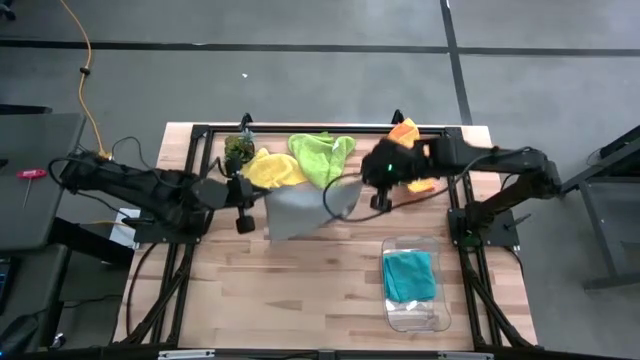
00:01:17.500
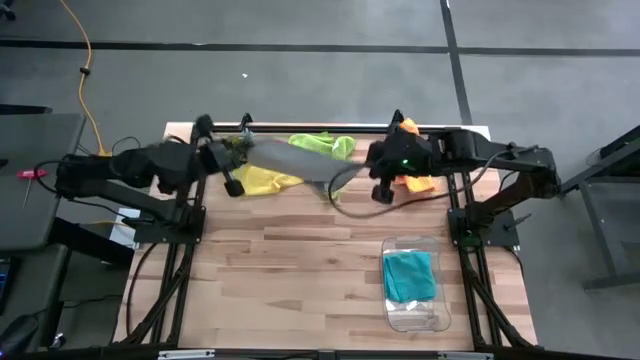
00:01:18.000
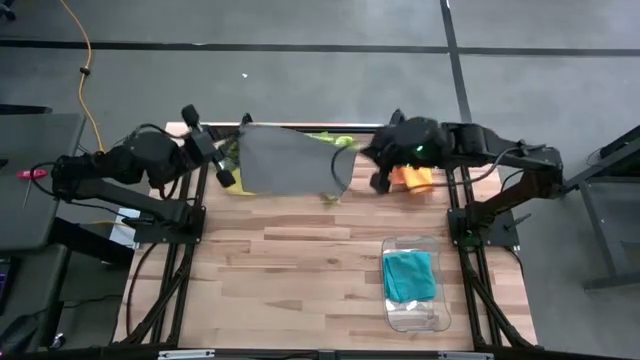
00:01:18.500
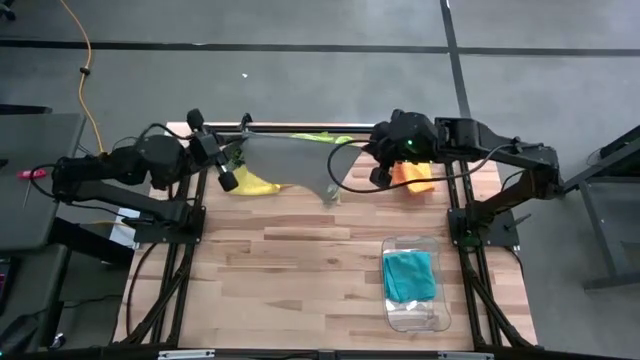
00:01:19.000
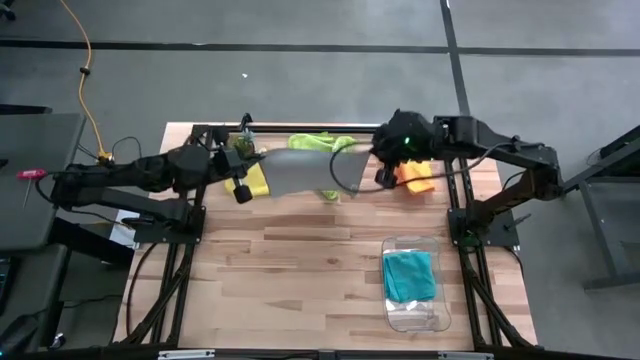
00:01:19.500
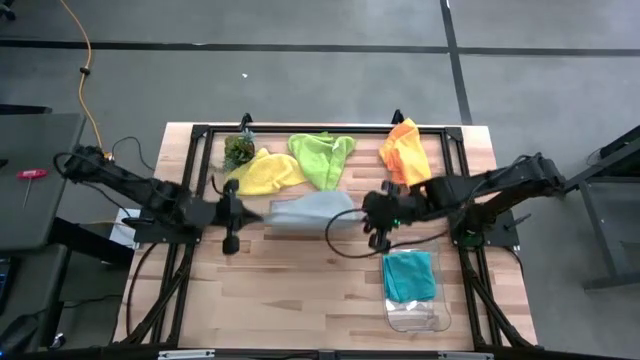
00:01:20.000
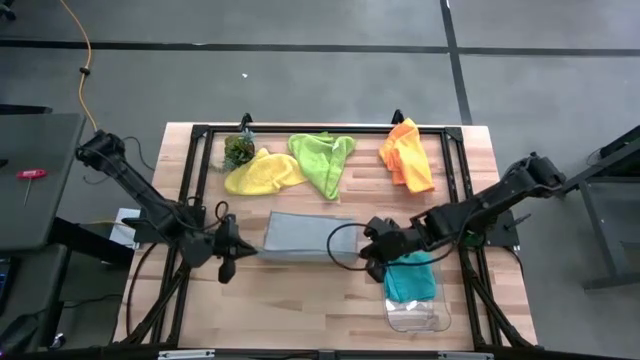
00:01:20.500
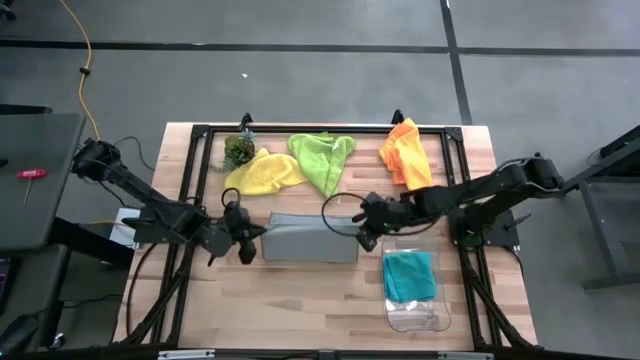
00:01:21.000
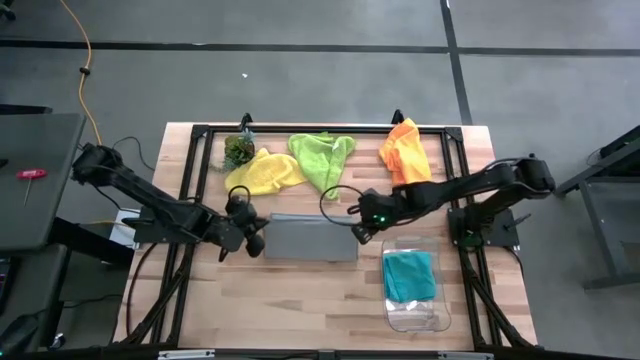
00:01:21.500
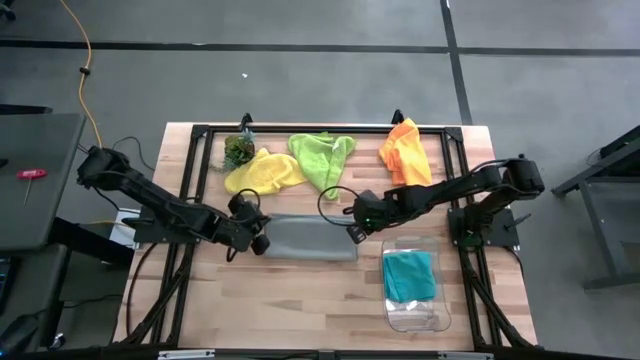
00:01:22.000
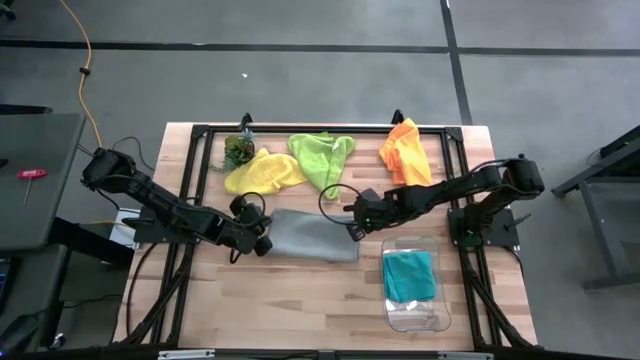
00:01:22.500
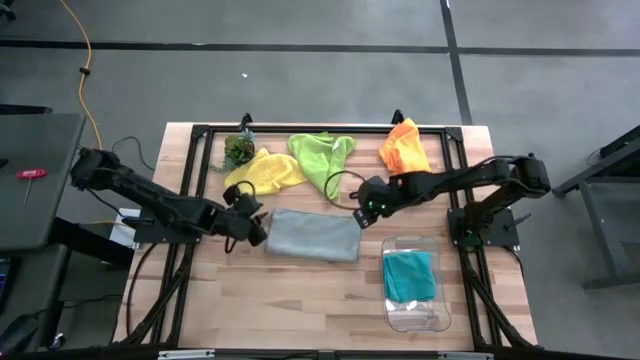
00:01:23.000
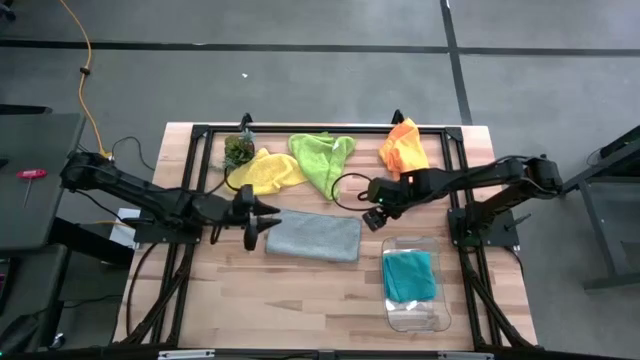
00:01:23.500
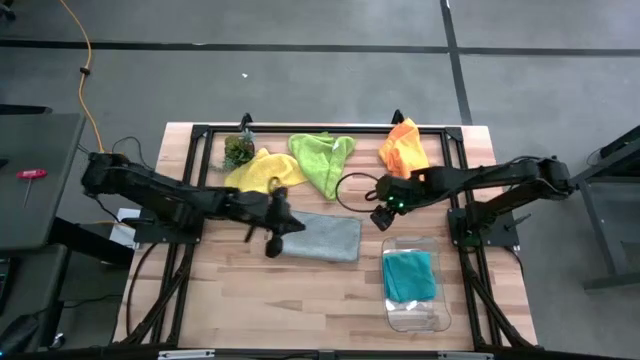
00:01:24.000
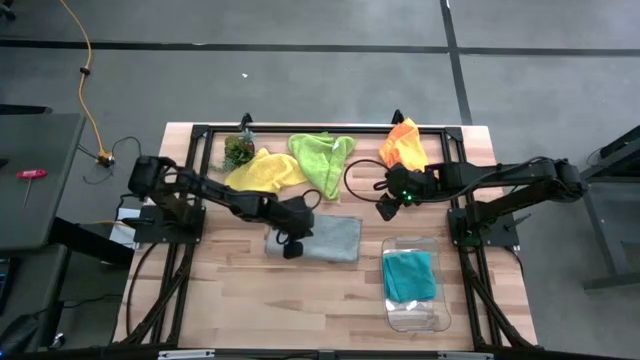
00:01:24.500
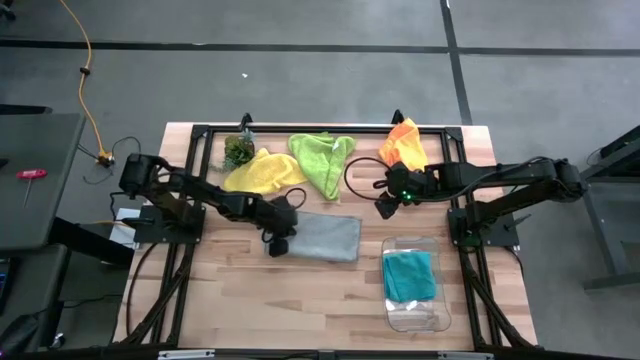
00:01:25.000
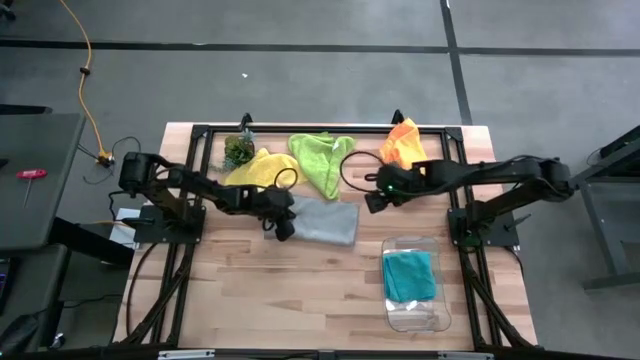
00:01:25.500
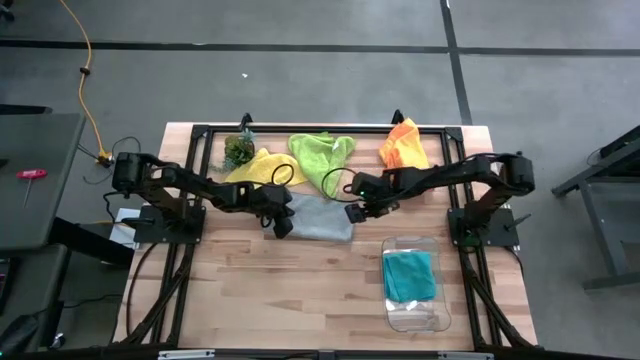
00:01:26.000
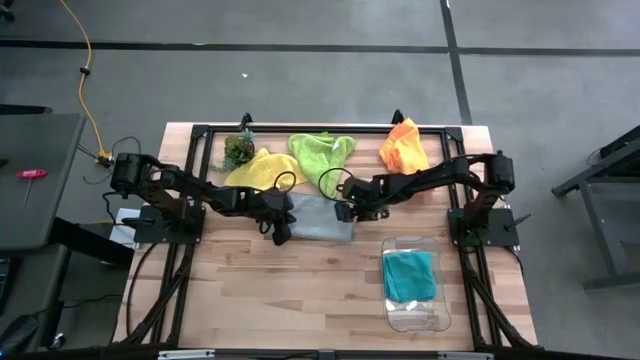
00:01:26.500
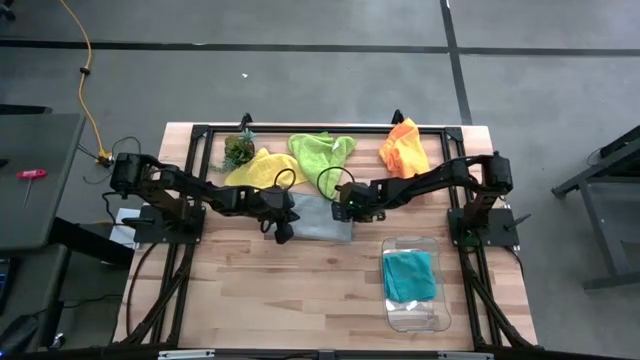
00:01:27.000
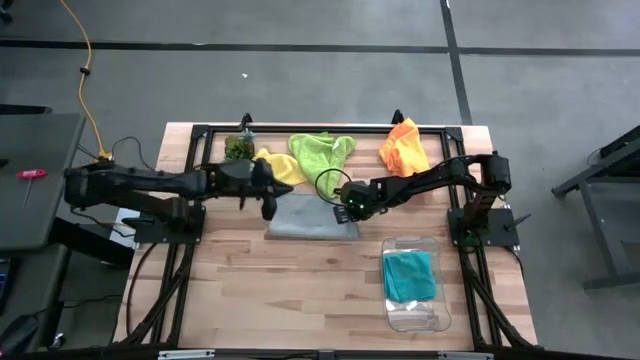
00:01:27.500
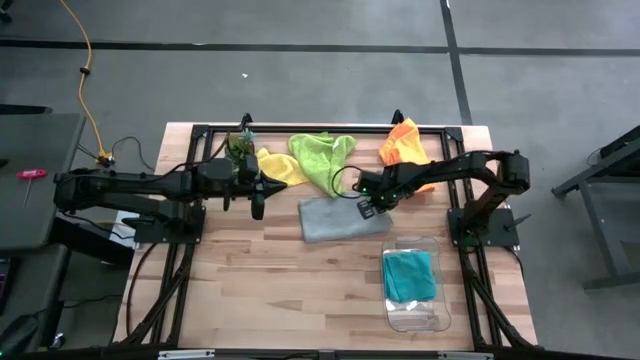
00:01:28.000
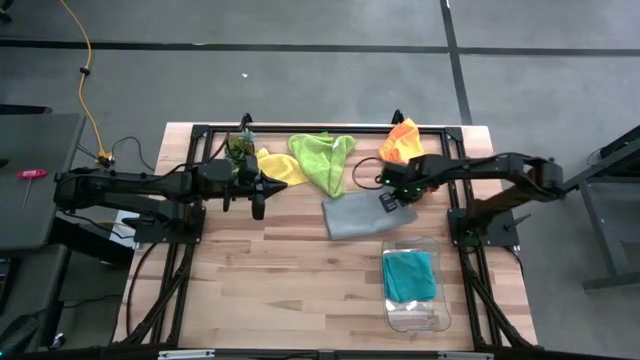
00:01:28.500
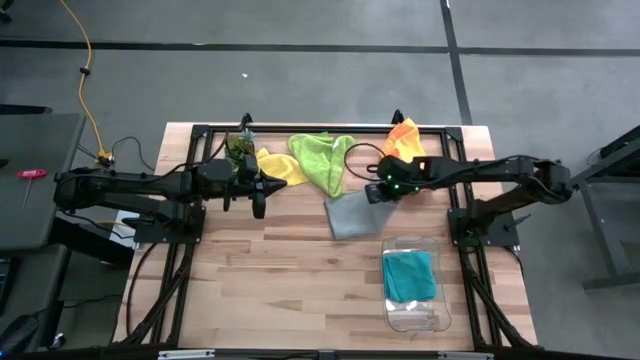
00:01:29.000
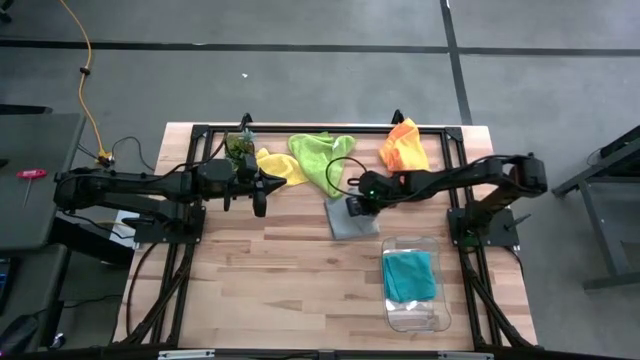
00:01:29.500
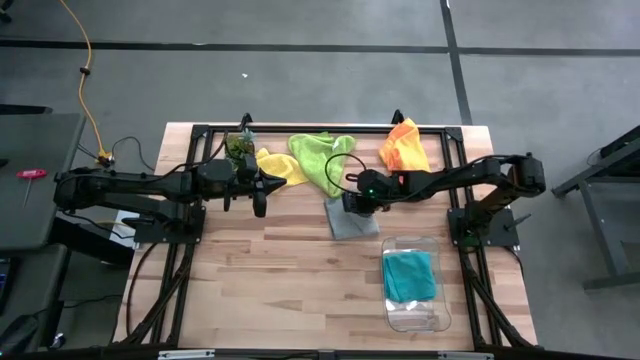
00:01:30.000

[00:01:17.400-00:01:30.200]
Task: Fold microfiber towels
Fold the gray microfiber cloth

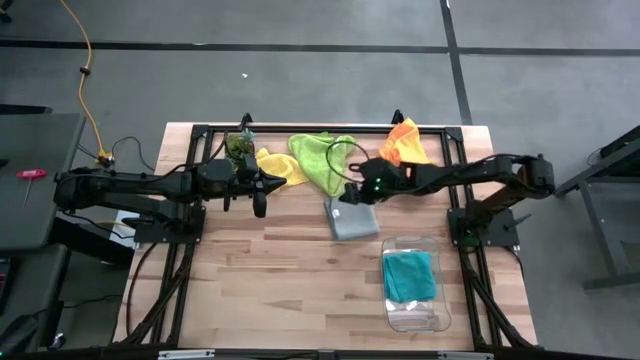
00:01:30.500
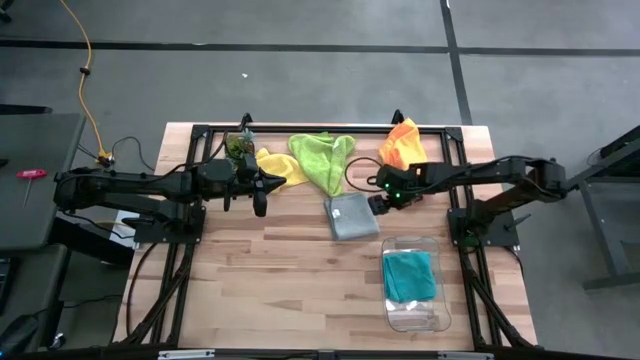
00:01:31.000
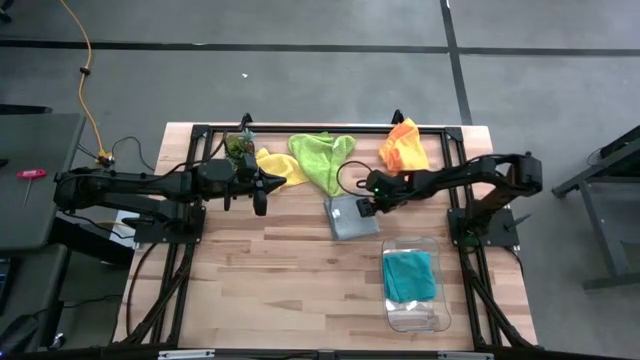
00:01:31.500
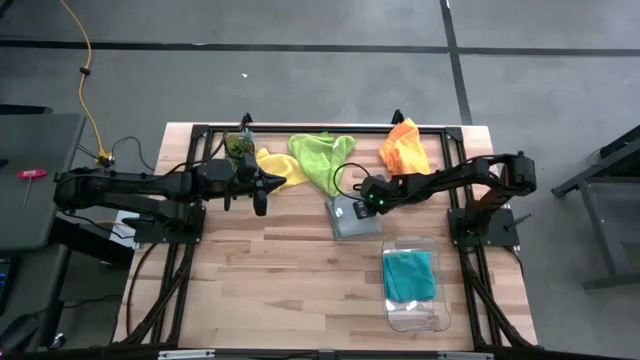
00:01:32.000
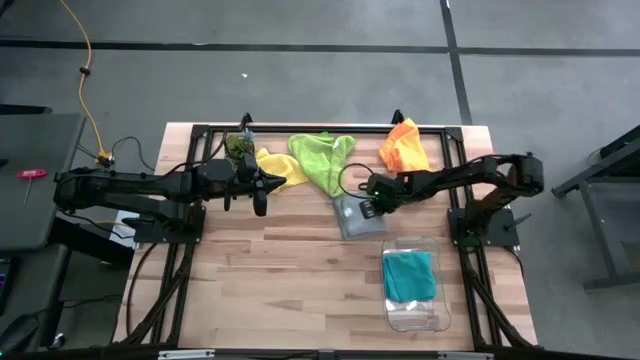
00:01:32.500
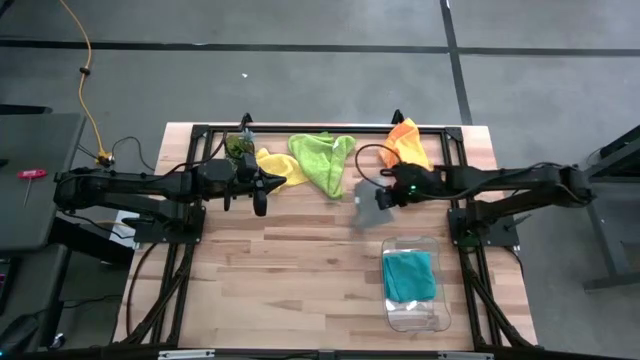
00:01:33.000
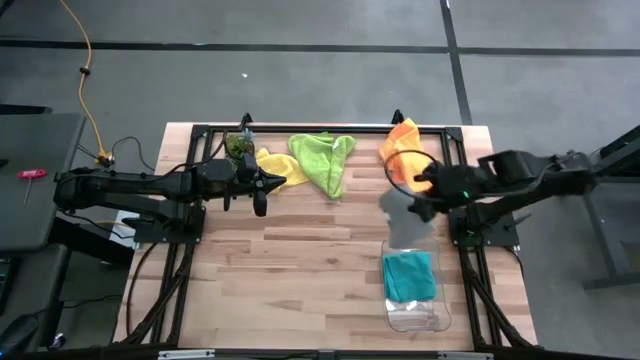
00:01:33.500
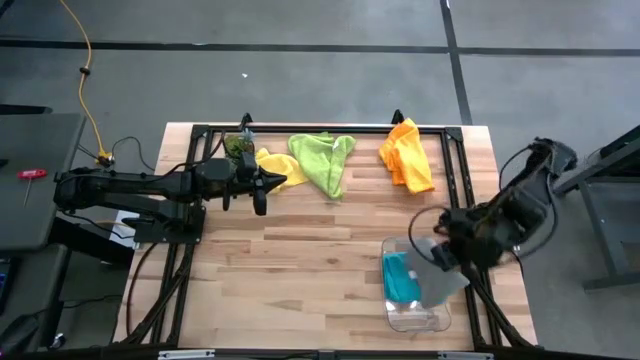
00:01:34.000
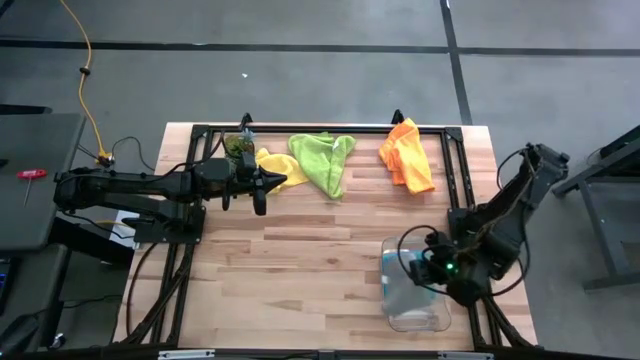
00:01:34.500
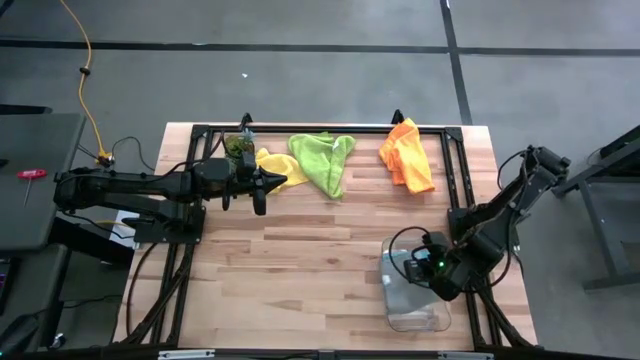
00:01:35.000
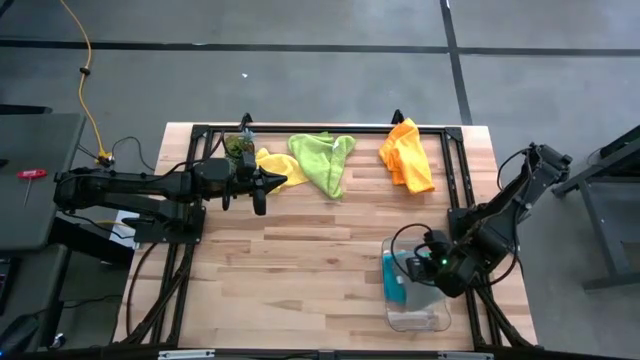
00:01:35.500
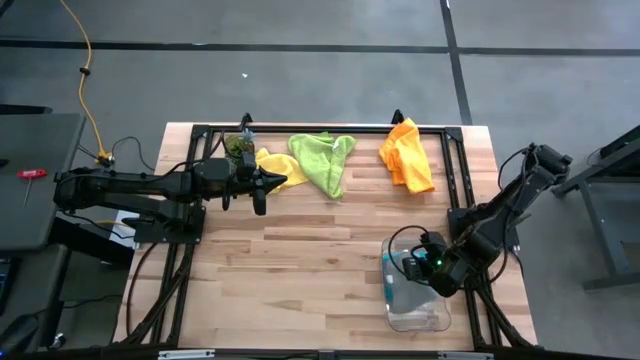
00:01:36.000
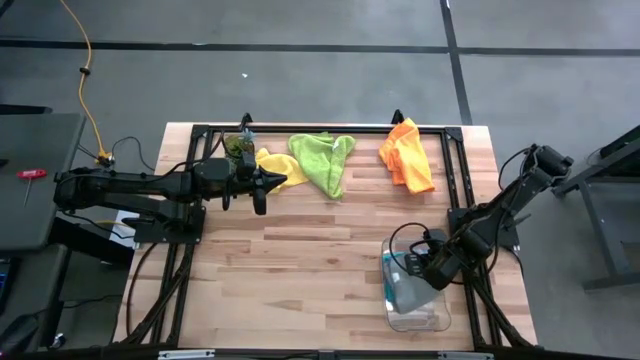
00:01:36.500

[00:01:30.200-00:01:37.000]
Stack the folded gray microfiber cloth on top of the blue microfiber cloth in the transparent bin

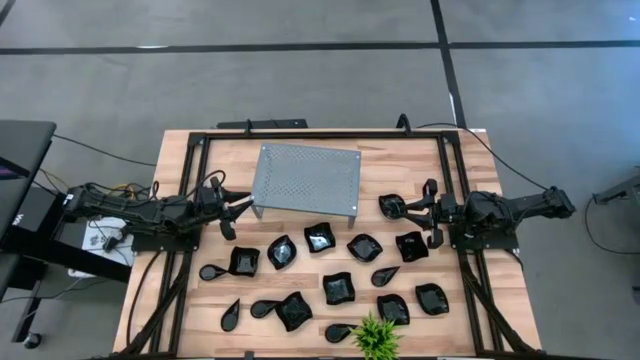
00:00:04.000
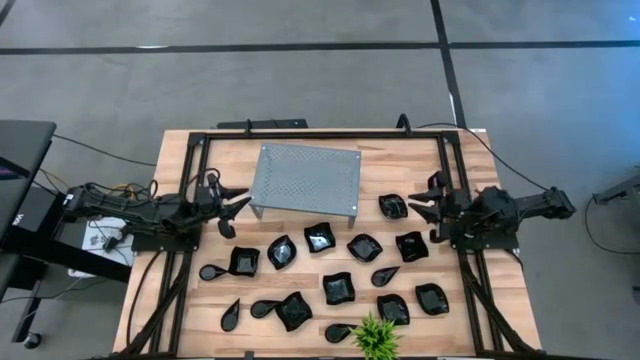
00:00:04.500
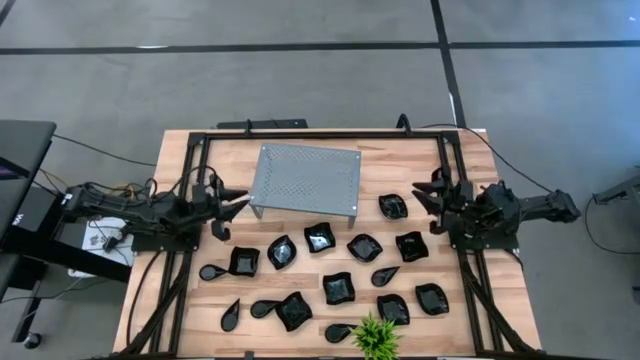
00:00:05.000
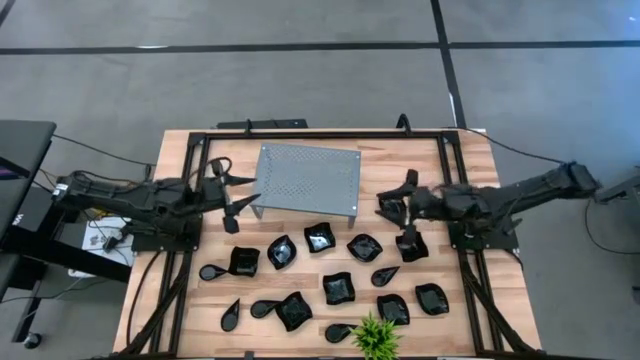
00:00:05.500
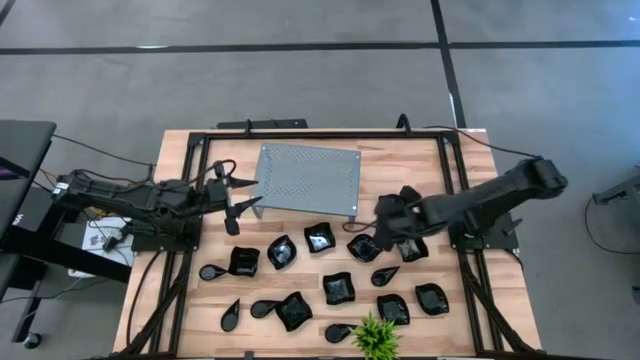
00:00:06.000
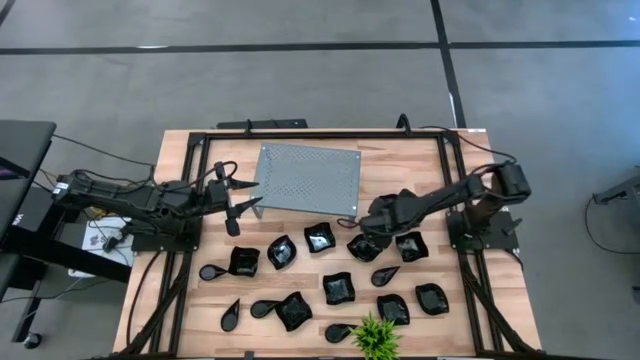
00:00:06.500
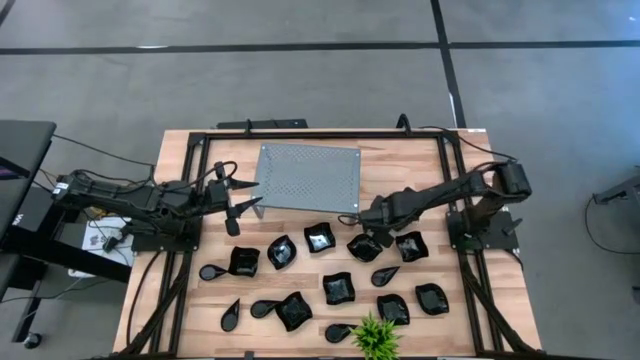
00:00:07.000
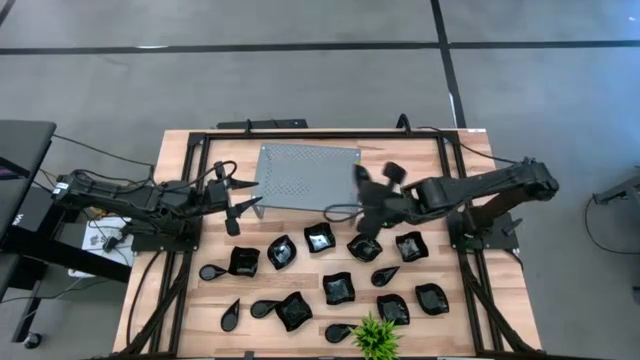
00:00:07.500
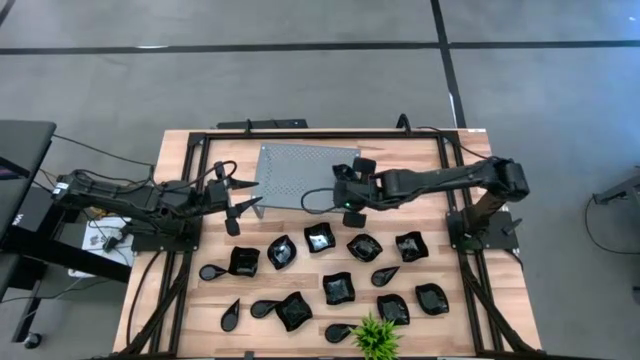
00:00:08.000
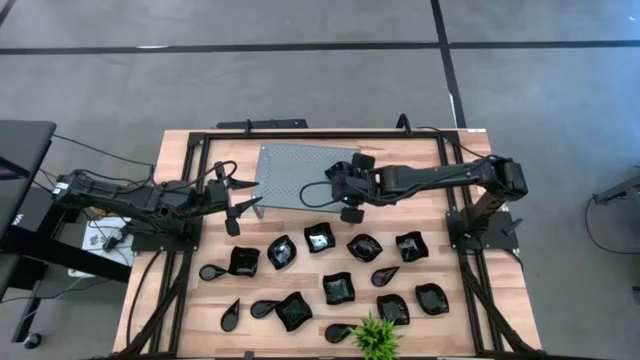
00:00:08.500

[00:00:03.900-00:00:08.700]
Task: Pick & Place Mini shaped plates
Put the black leaf-shaped plate on the shelf
